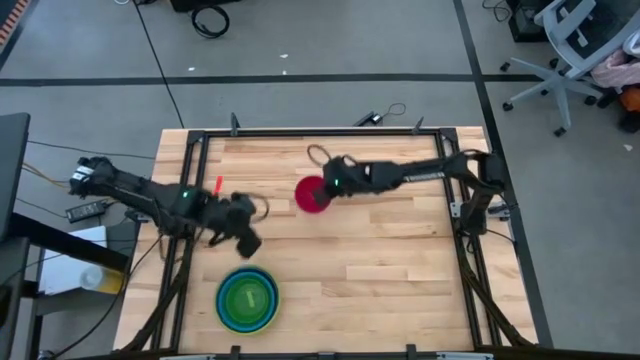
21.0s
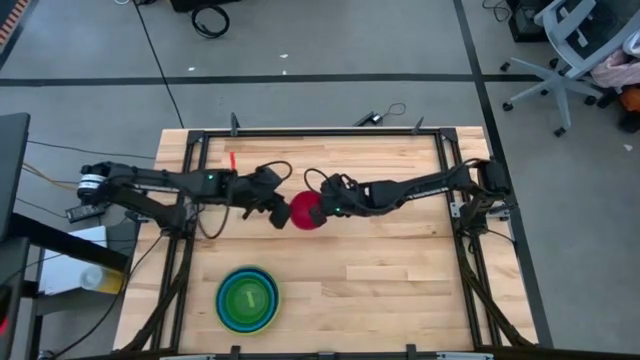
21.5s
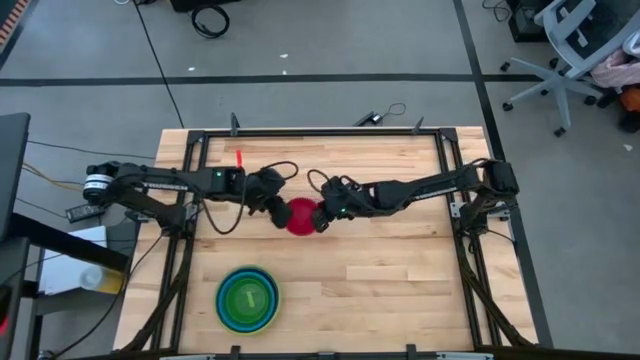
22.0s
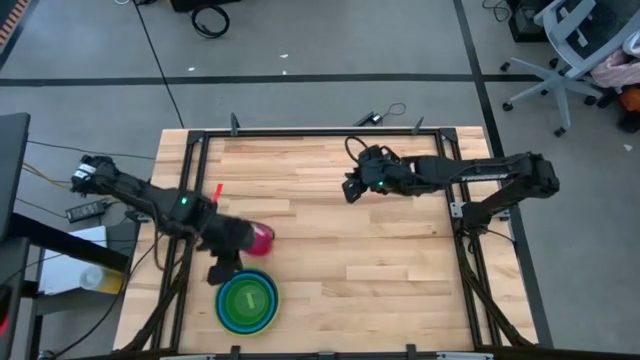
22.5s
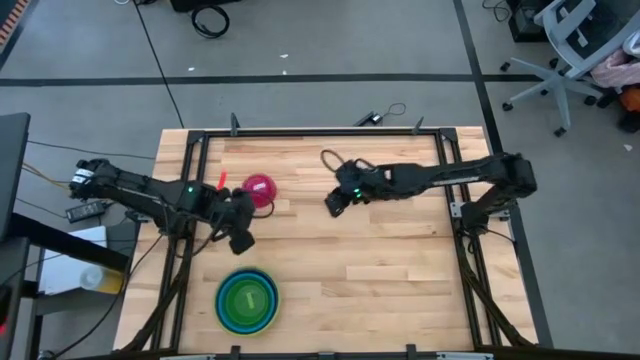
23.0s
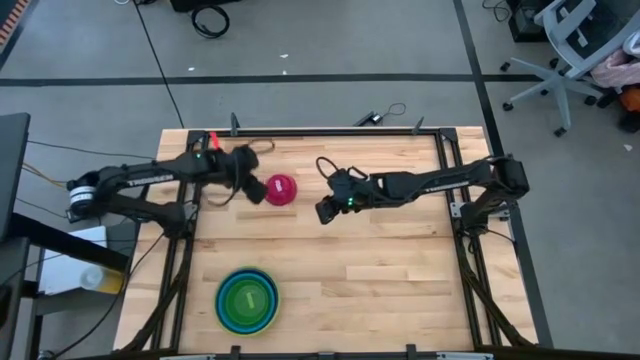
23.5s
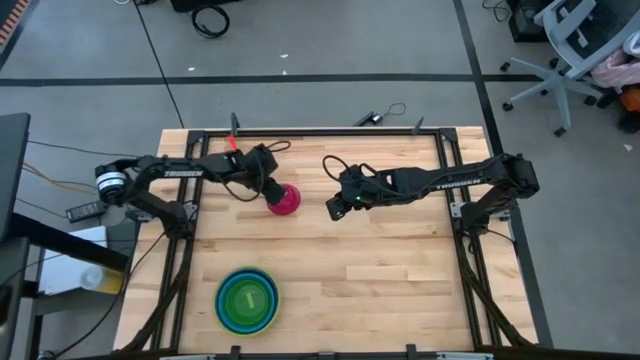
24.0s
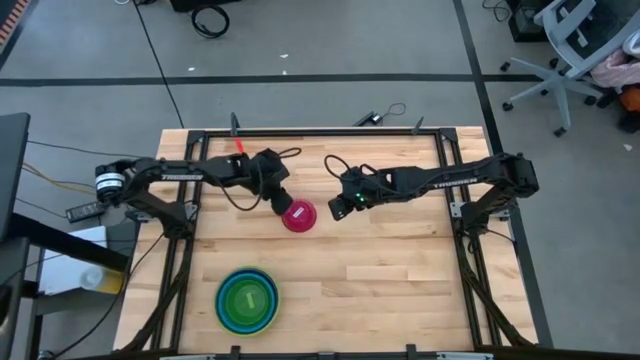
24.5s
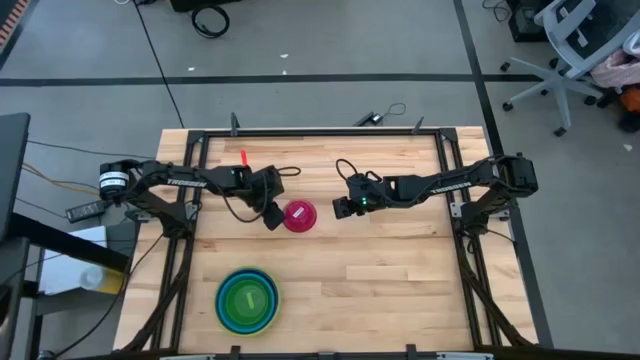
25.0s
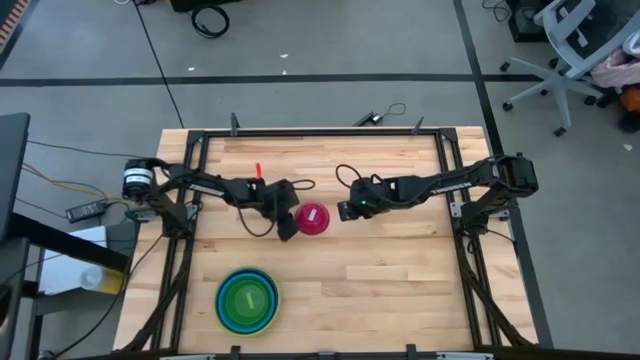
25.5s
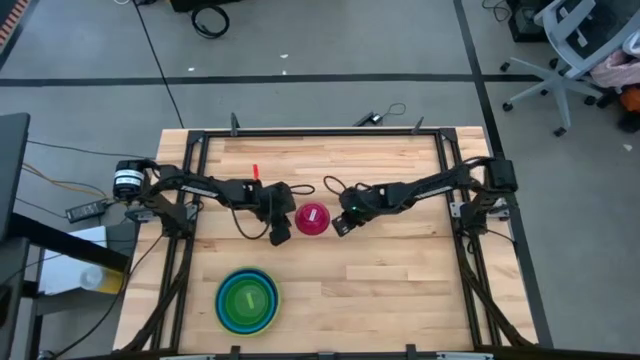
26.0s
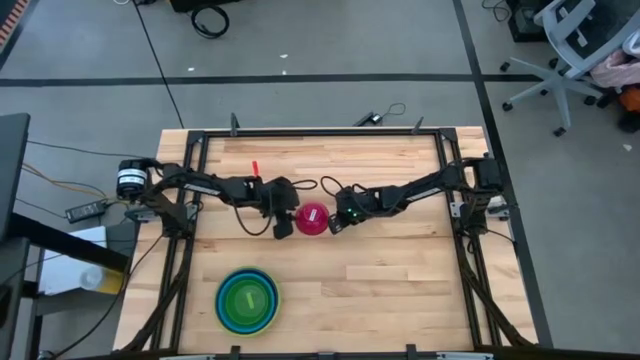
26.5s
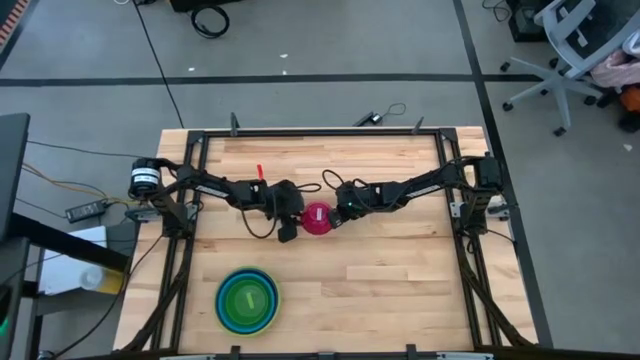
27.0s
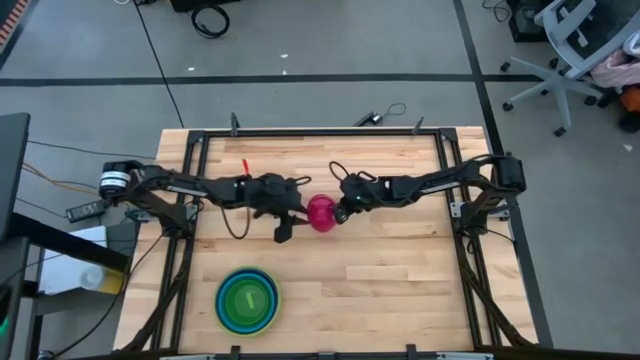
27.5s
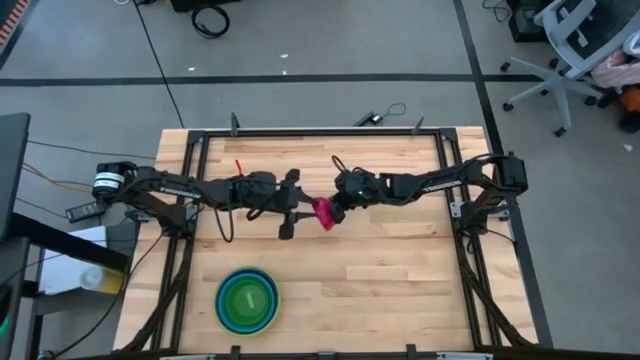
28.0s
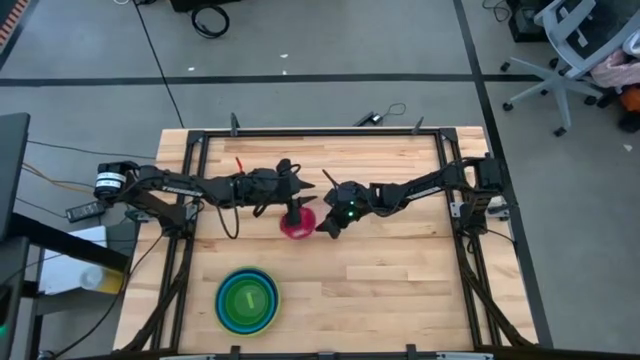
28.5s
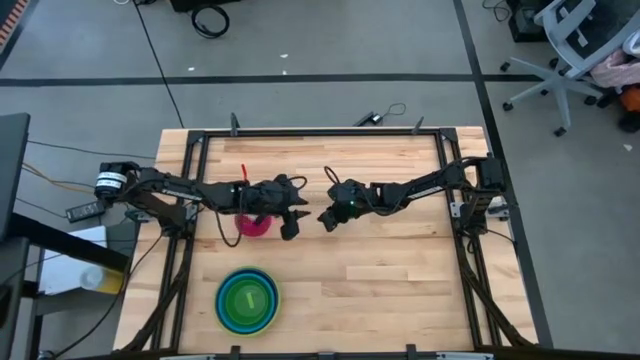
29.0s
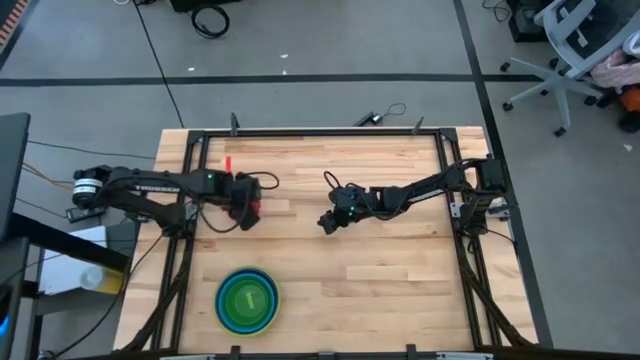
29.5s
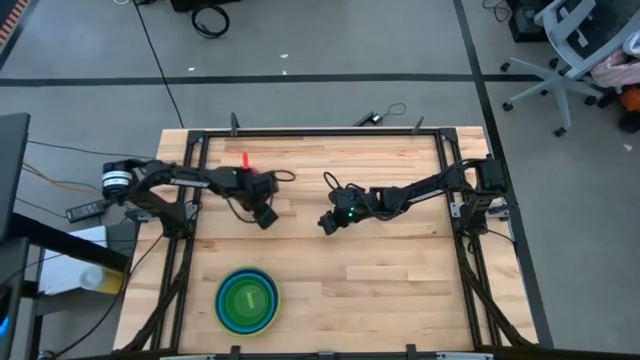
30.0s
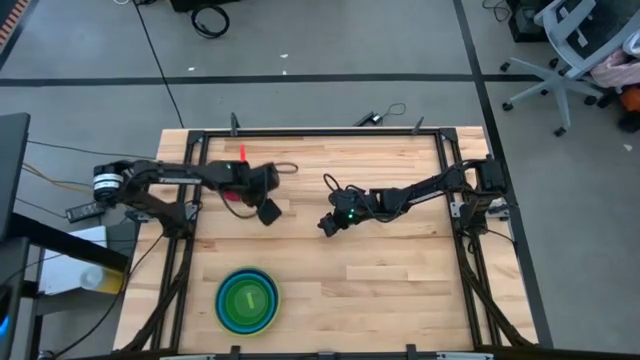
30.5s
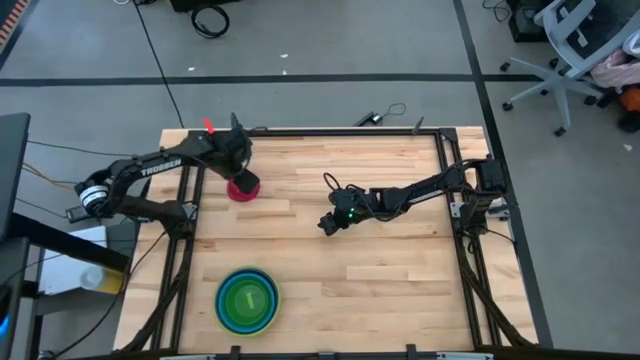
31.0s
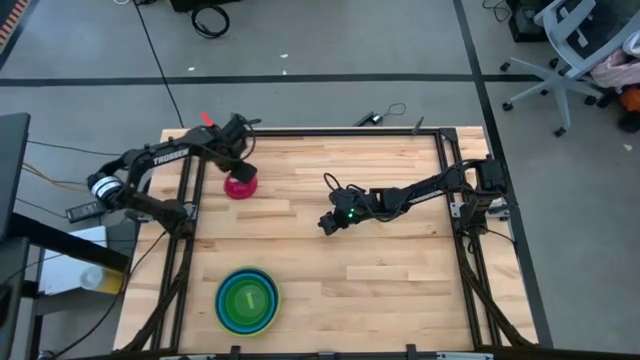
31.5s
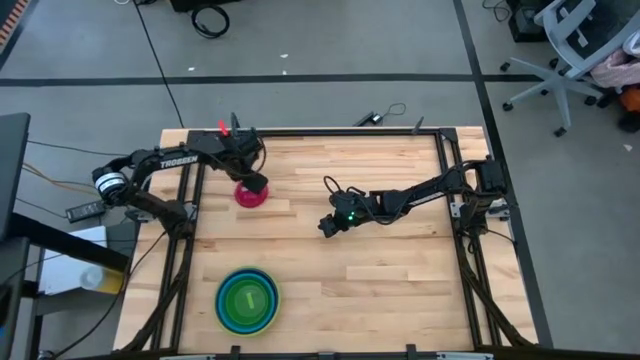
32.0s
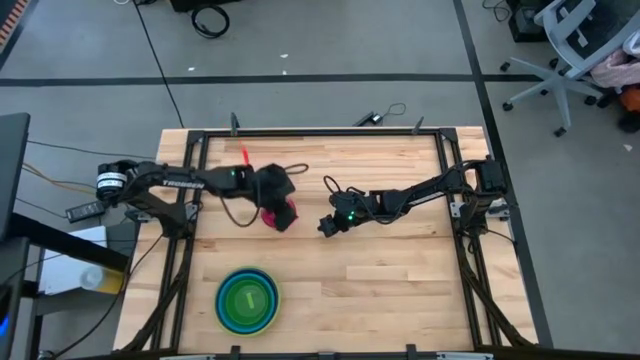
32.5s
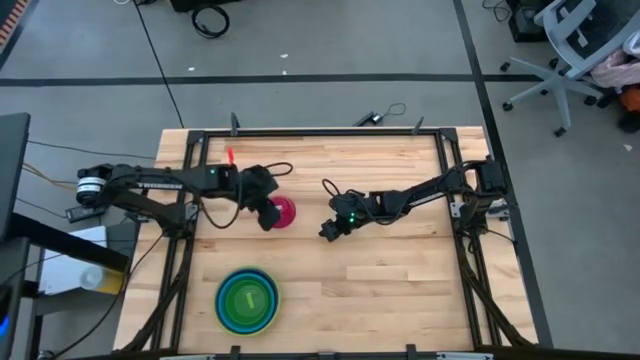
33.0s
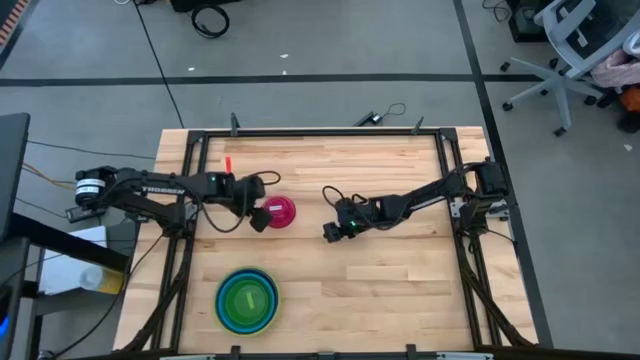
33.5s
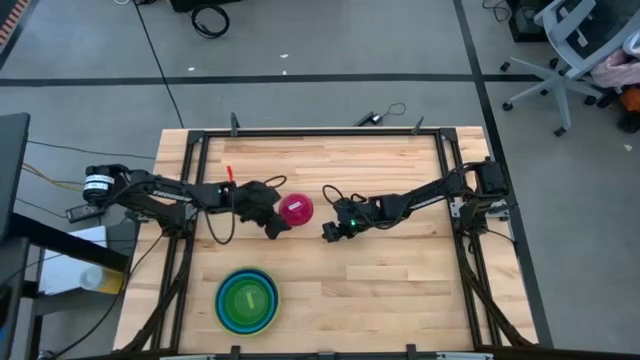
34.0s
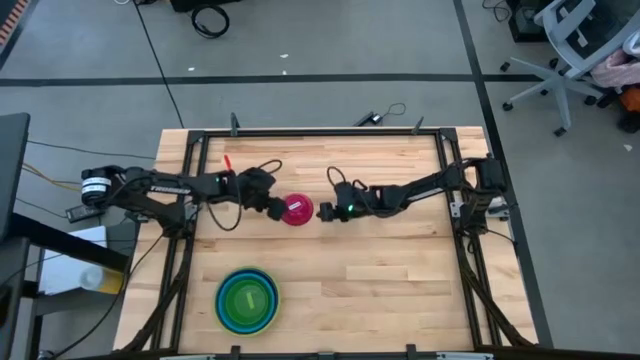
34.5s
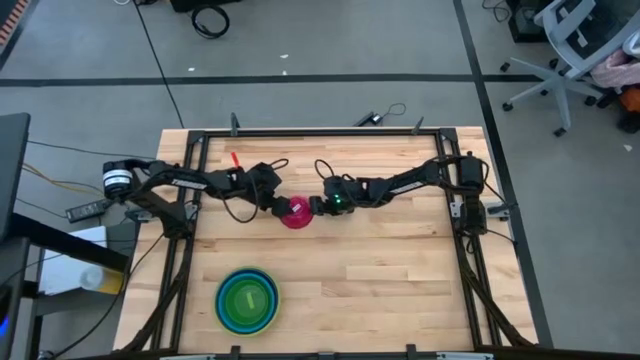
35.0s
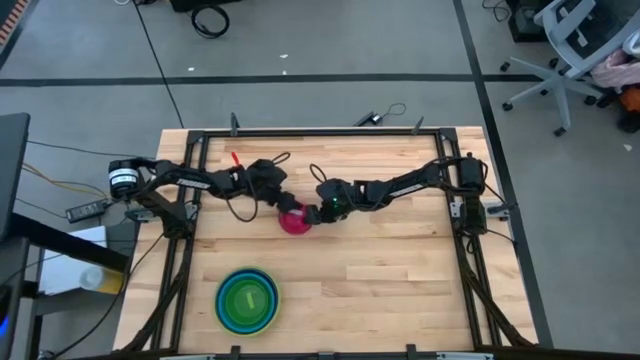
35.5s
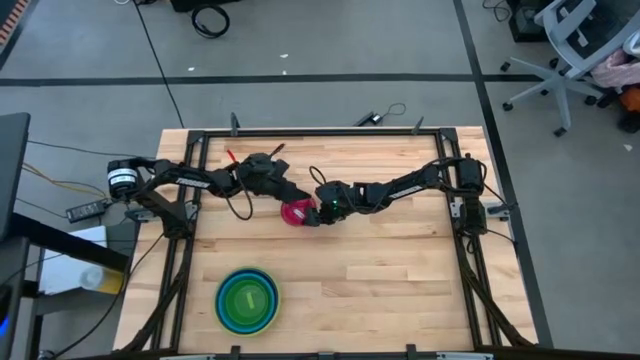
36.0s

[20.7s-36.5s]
Stack the extra small red bowl on top of the small green bowl

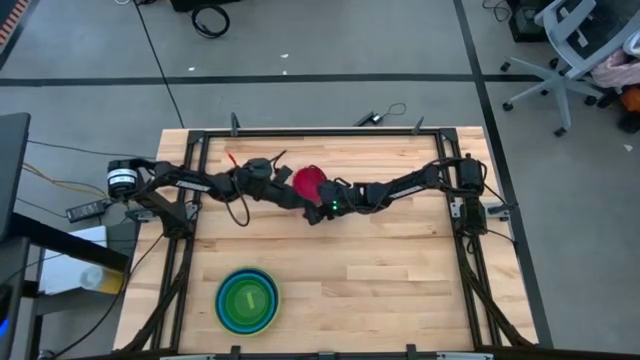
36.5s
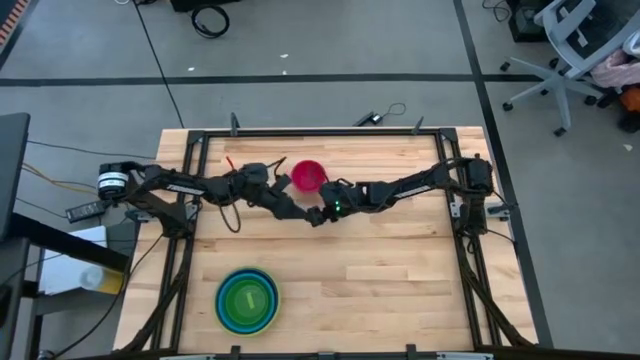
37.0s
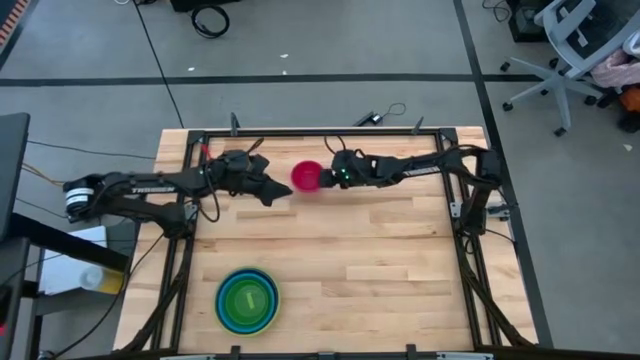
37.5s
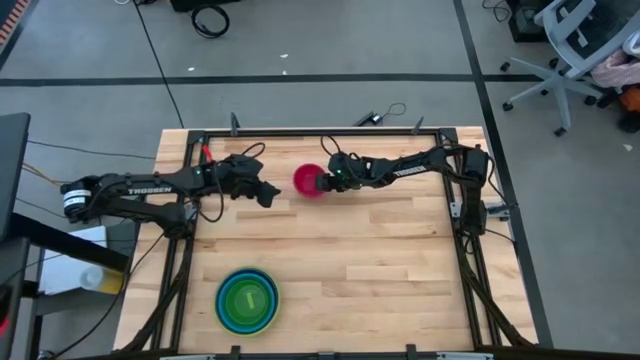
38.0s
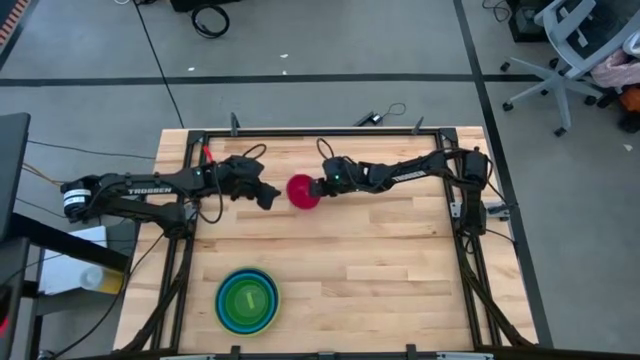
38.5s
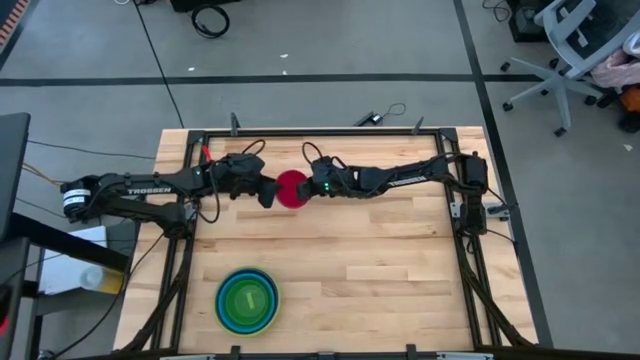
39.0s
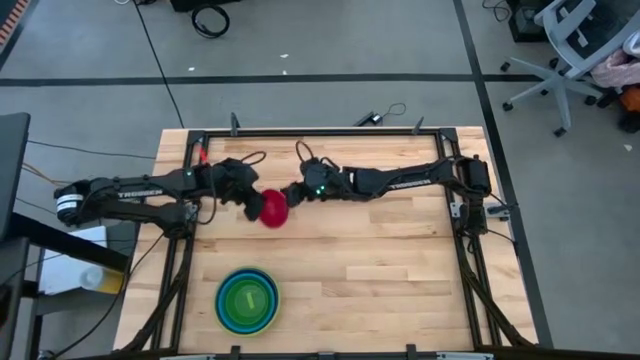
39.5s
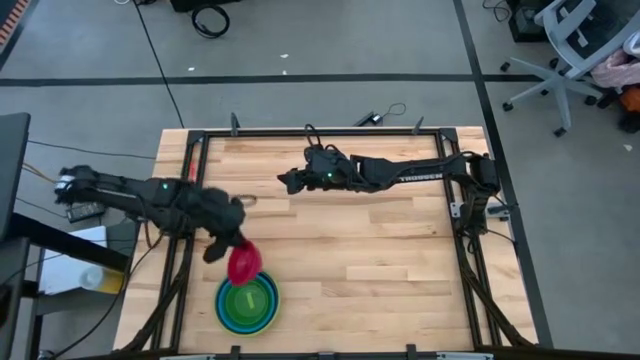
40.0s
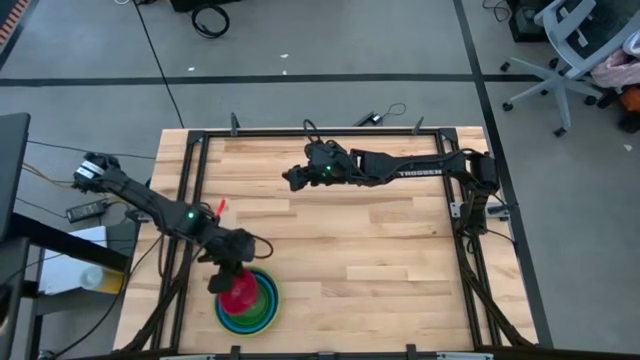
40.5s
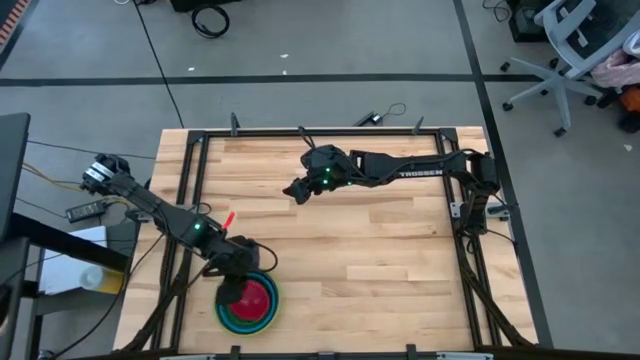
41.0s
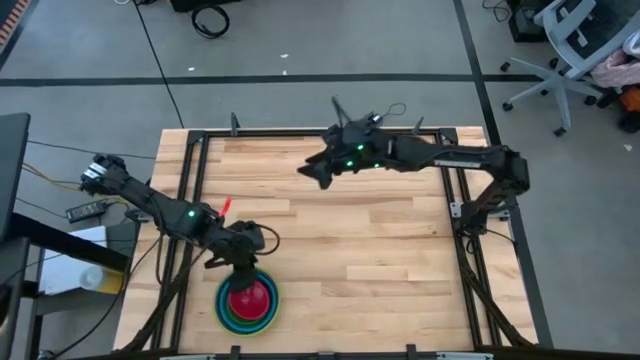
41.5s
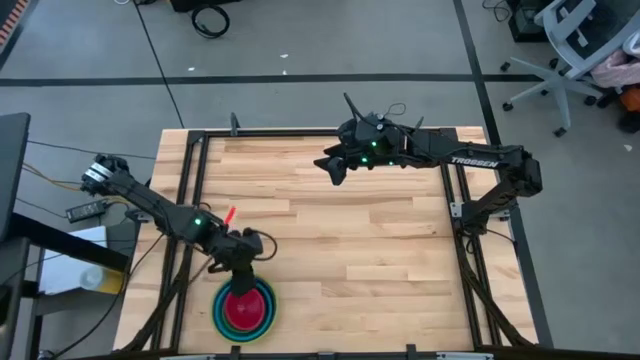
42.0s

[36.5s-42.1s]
Stack the extra small red bowl on top of the small green bowl
